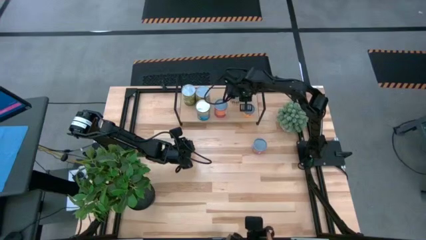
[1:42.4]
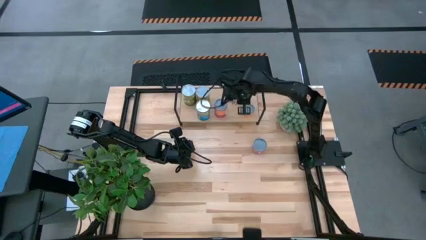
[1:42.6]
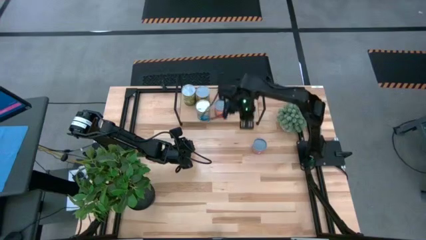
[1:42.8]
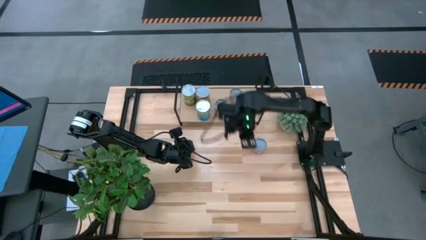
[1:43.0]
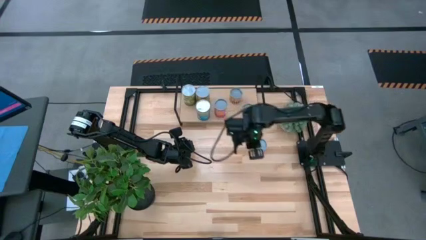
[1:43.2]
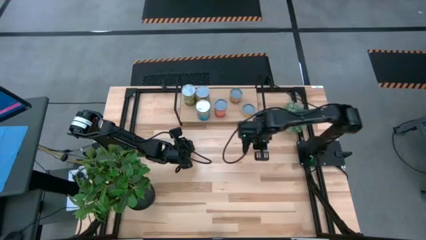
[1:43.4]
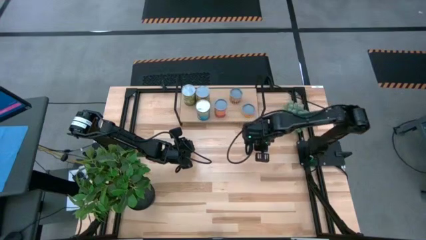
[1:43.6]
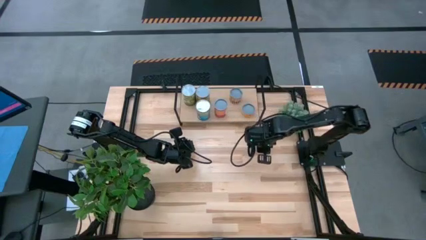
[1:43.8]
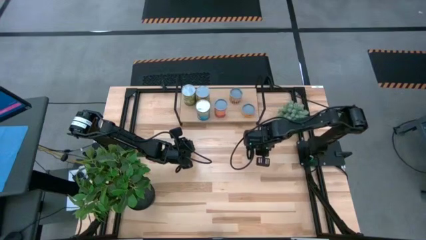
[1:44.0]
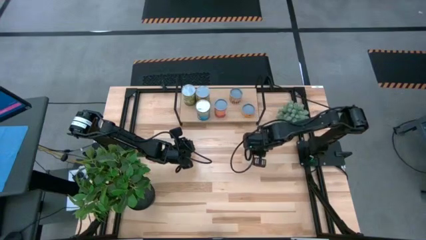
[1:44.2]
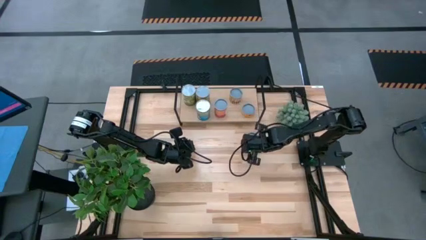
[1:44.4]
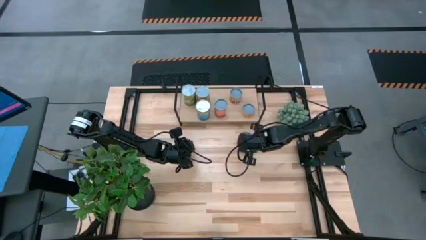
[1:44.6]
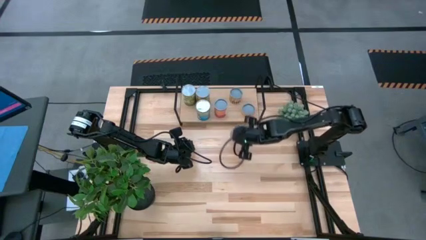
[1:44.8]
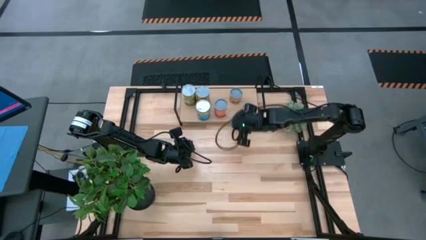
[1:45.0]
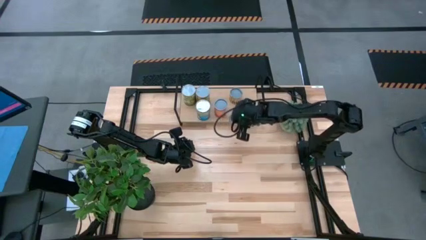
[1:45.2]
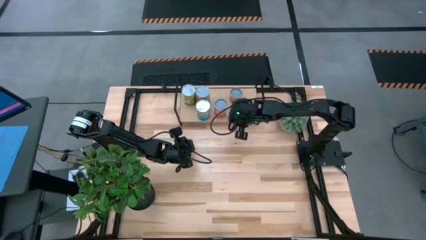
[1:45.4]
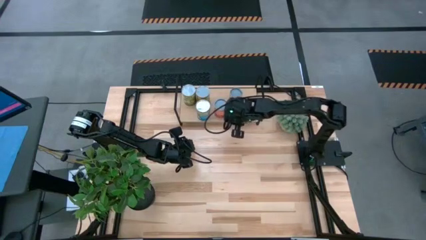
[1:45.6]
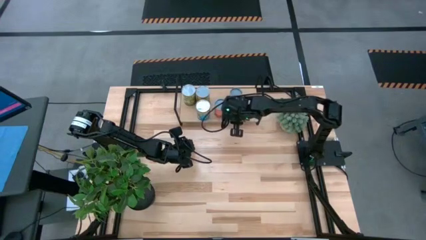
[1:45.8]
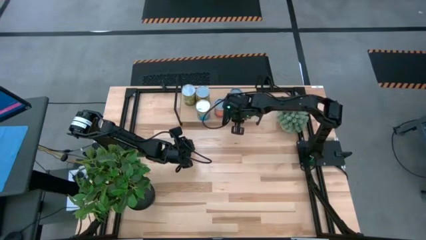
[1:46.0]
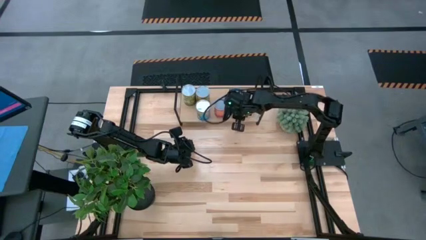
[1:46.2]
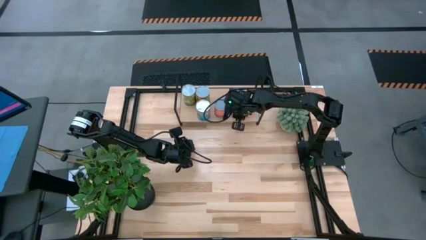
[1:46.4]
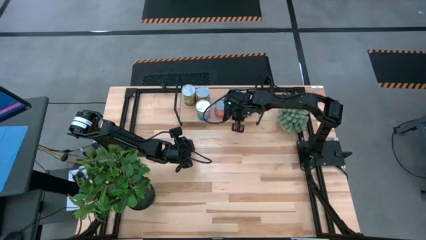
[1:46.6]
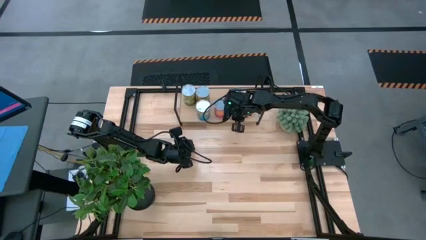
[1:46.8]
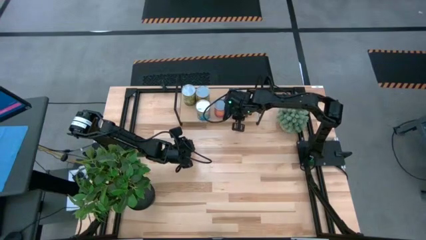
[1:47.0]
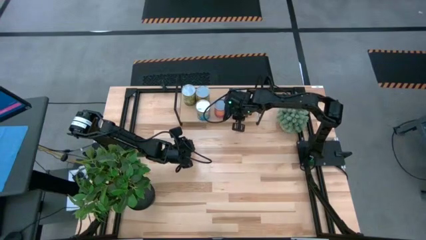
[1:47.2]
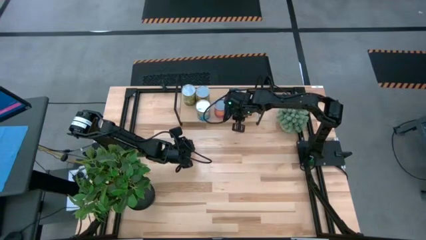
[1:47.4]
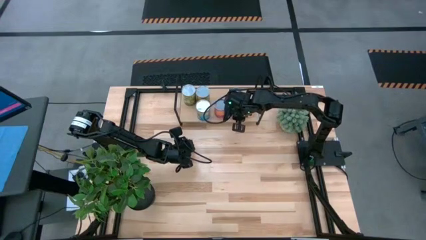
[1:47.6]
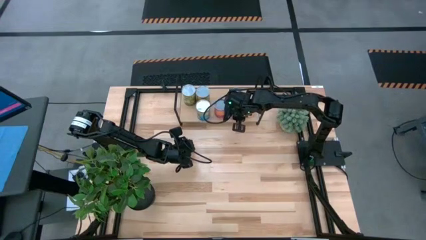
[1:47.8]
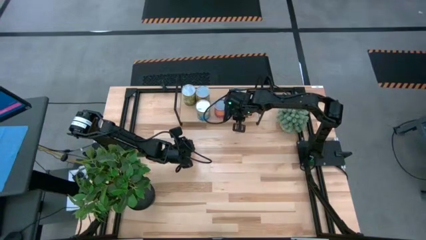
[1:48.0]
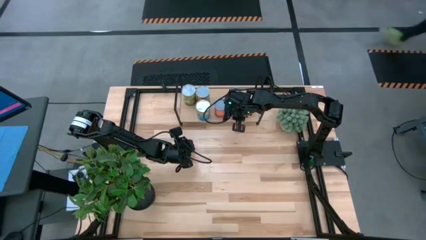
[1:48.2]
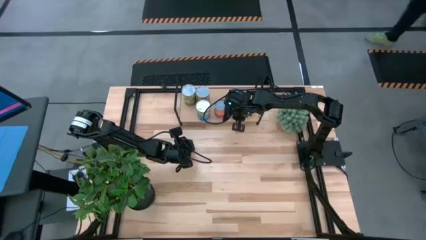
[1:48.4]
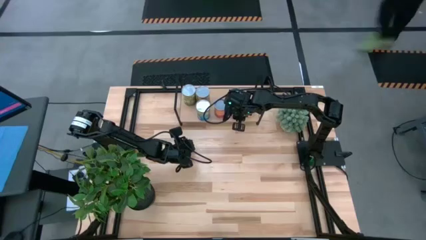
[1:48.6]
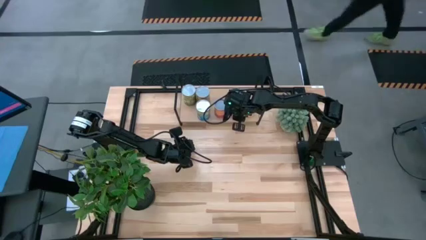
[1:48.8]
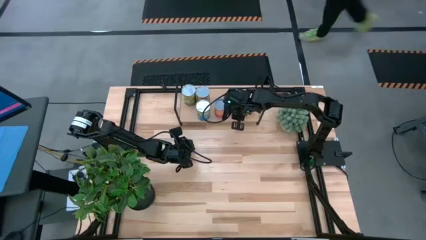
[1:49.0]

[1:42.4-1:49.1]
Task: Pick and place cans onto a shelf
Put the canned mixed vegetables on the shelf

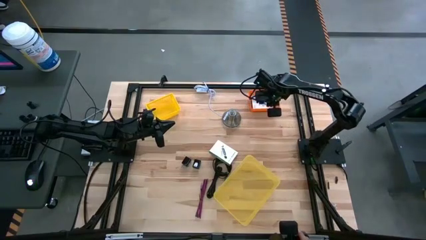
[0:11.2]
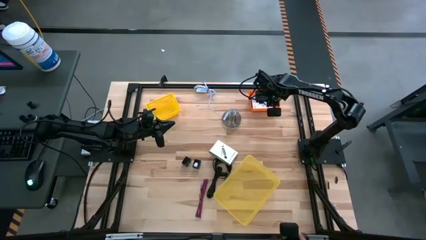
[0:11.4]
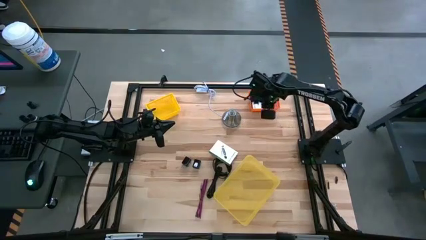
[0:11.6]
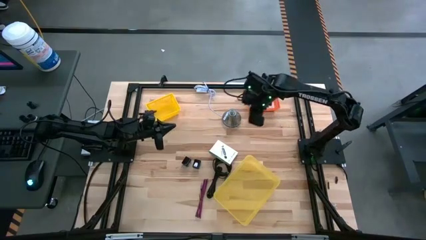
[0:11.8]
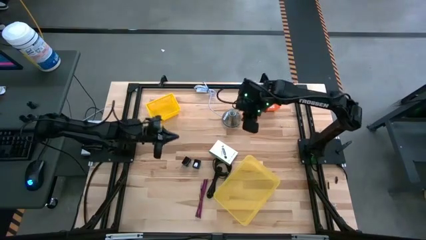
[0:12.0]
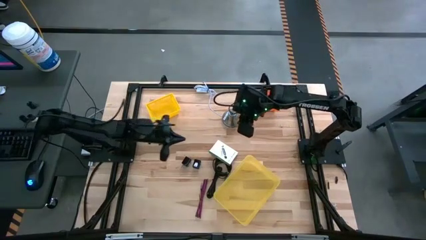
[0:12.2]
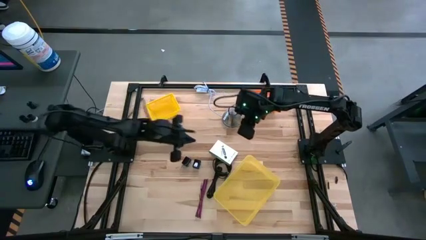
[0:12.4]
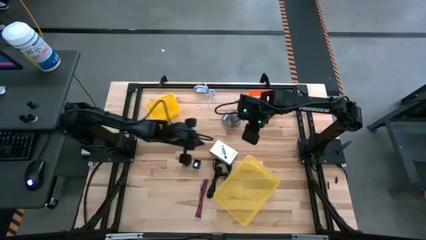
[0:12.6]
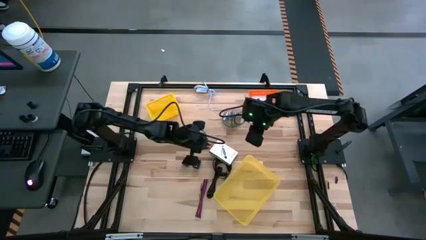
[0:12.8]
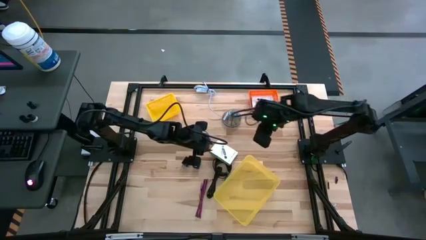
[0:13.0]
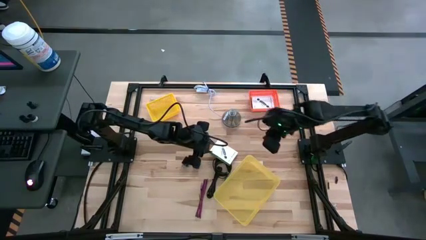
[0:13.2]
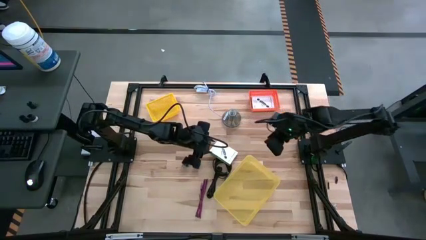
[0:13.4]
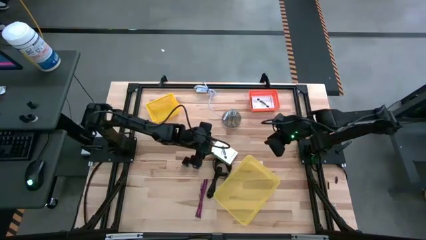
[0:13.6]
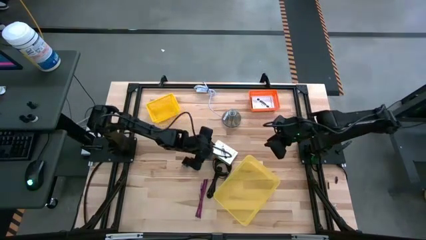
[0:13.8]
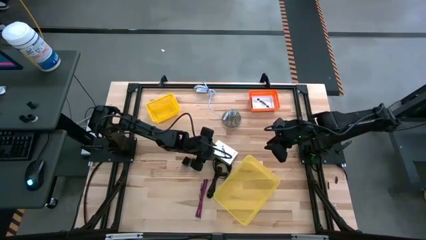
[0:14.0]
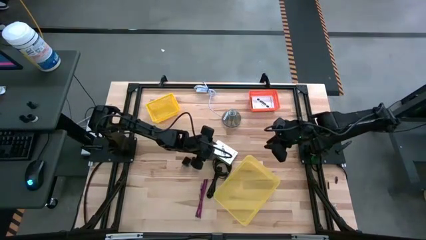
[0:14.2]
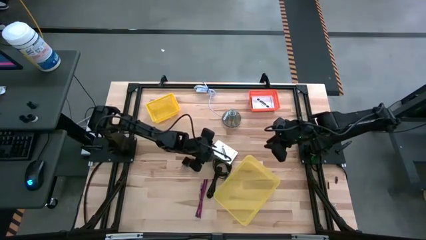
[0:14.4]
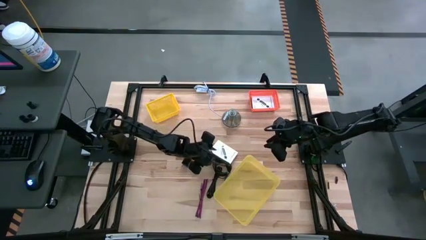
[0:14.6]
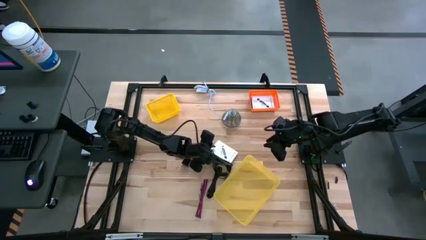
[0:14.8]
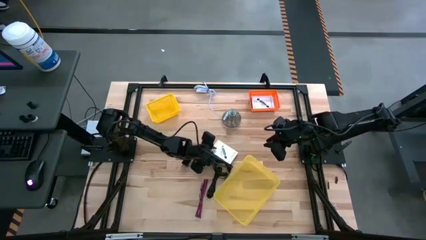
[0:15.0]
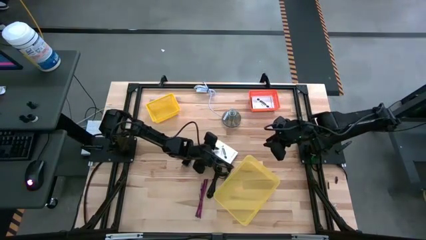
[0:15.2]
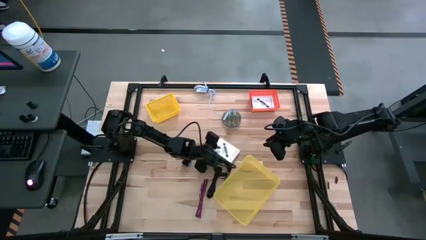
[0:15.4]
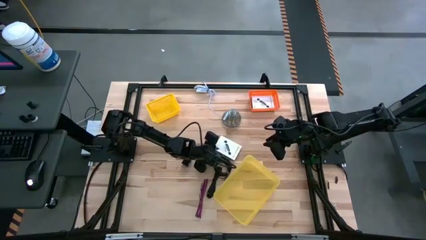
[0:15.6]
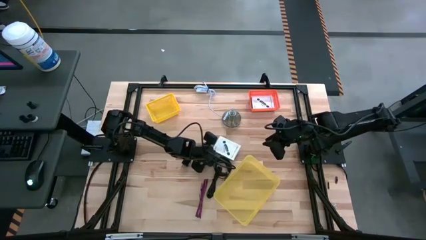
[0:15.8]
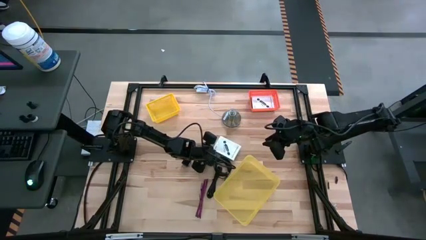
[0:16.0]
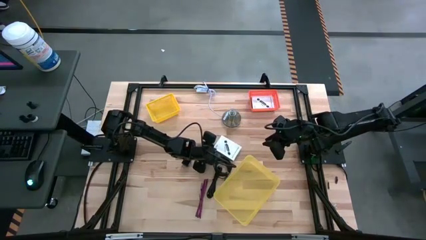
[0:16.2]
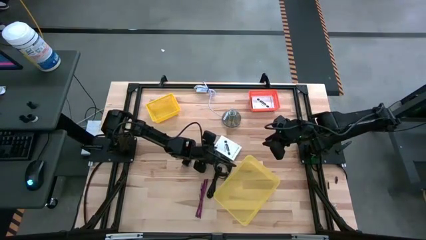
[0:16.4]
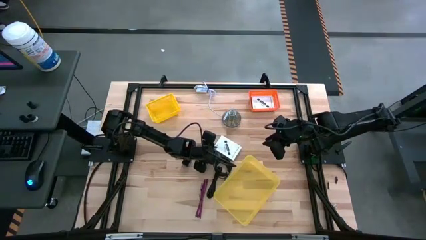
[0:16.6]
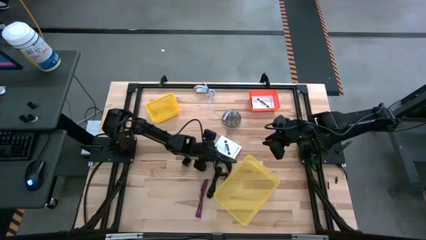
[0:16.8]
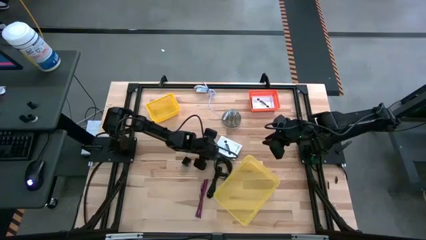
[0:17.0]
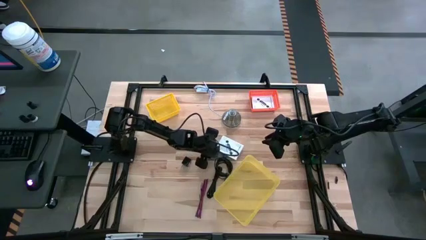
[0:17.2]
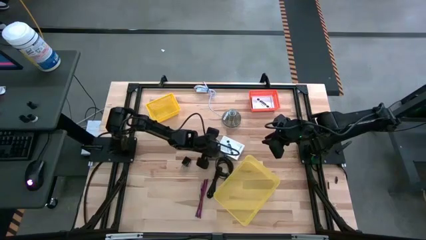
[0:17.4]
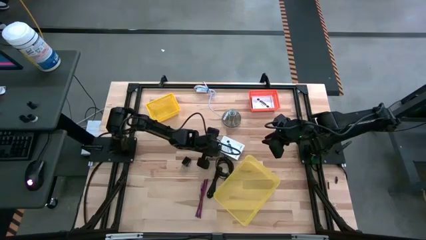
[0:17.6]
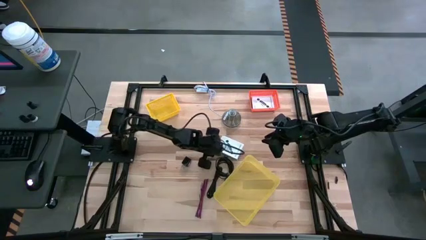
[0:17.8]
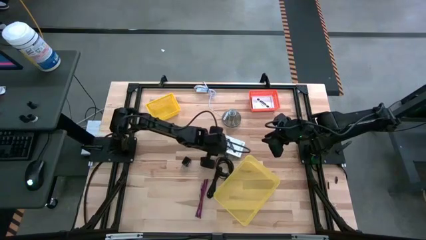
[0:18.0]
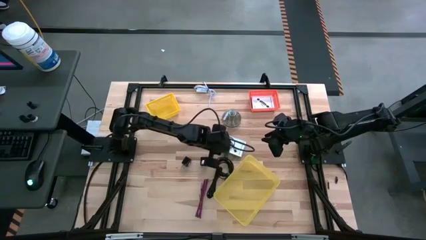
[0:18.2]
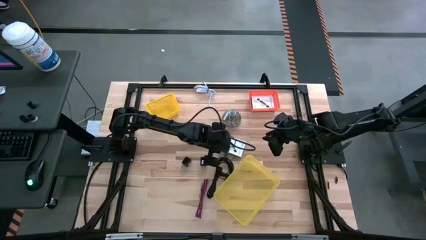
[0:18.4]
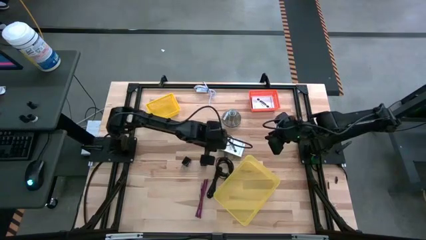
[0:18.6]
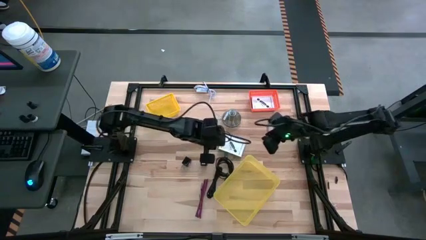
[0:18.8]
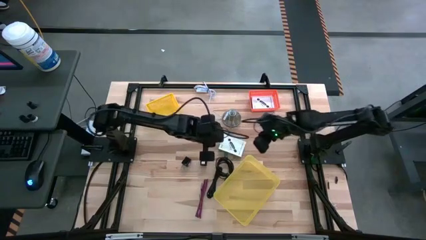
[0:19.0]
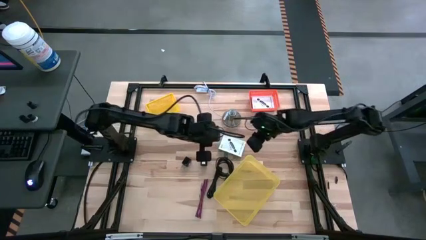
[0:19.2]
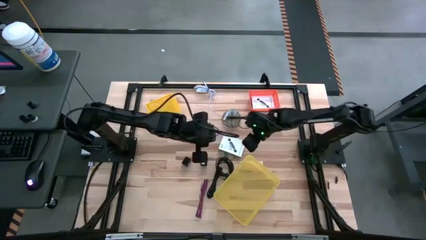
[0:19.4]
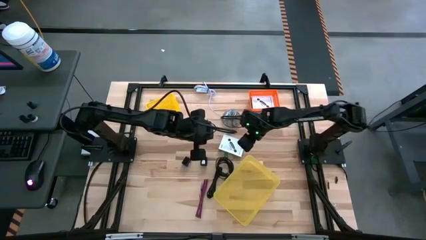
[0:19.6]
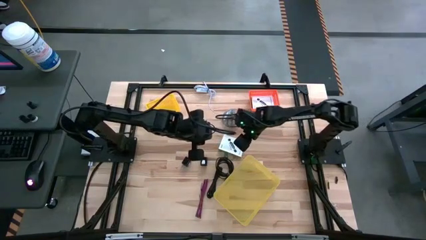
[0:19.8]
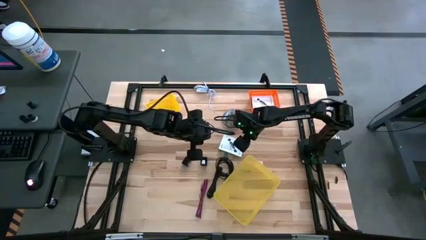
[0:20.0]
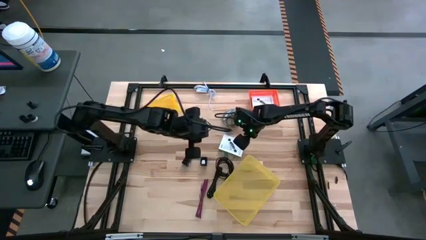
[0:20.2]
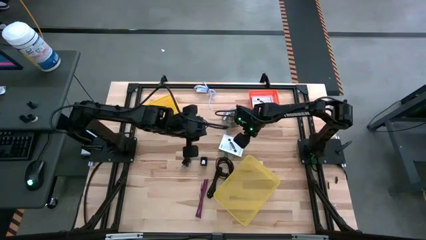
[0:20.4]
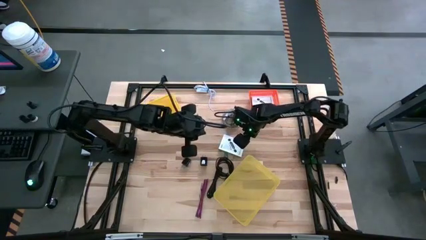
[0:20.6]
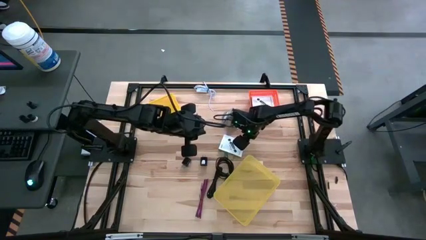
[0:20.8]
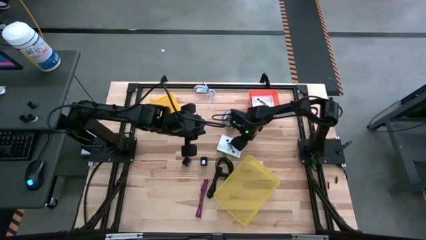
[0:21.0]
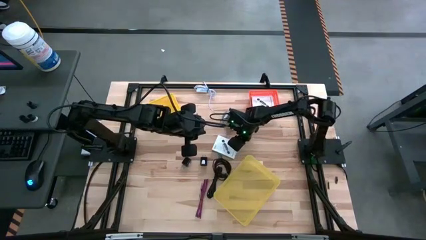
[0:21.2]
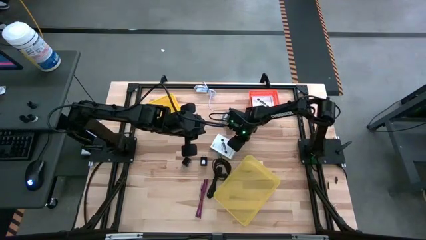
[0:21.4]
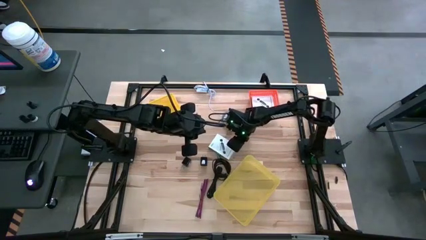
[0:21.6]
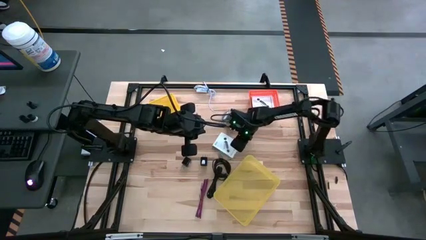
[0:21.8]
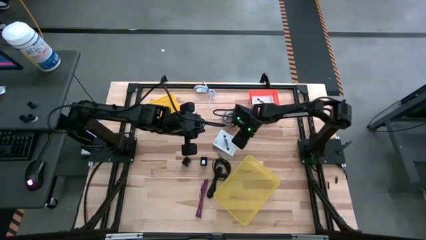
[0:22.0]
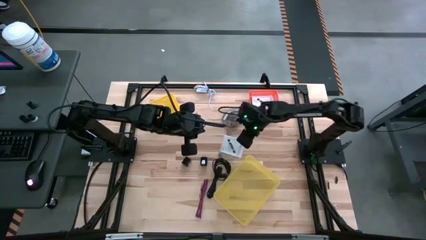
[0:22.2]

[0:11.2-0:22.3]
Task: Pick and place items into bin
Put the white card reader box into the orange bin
